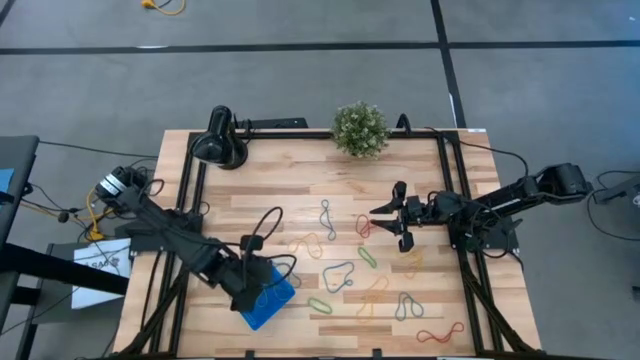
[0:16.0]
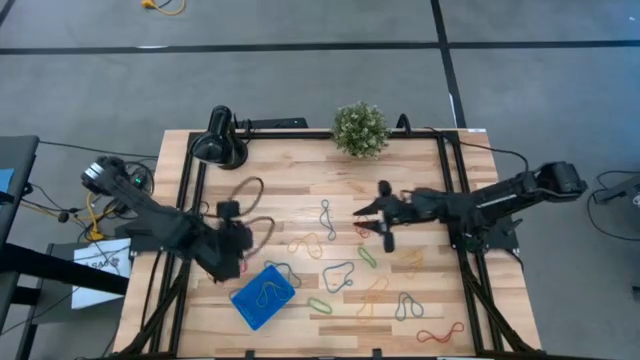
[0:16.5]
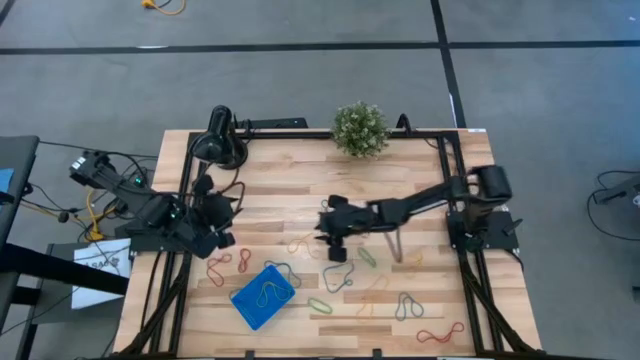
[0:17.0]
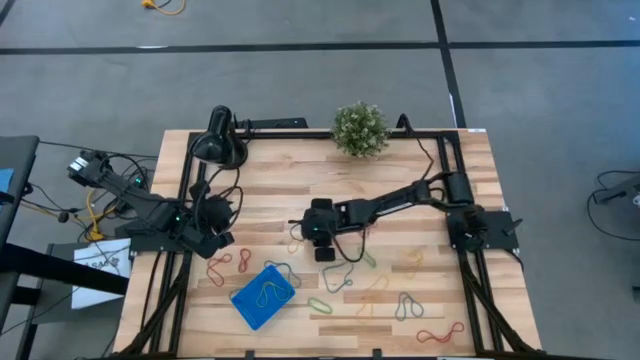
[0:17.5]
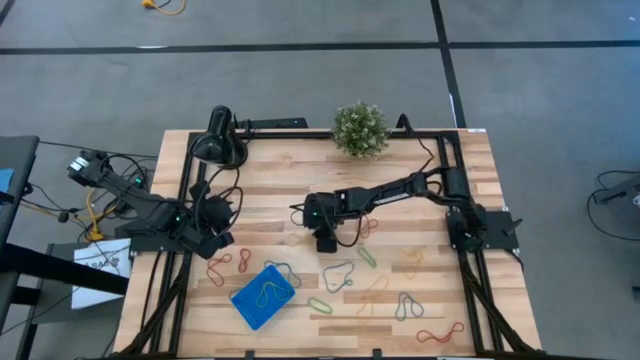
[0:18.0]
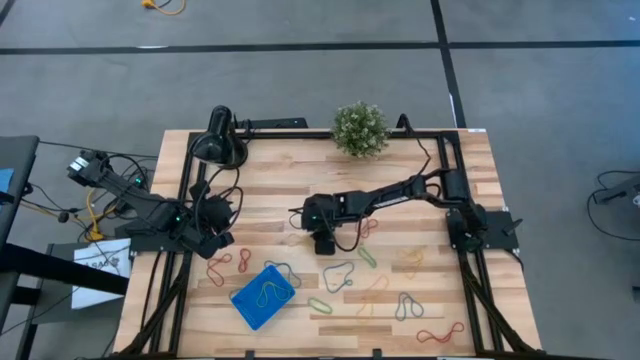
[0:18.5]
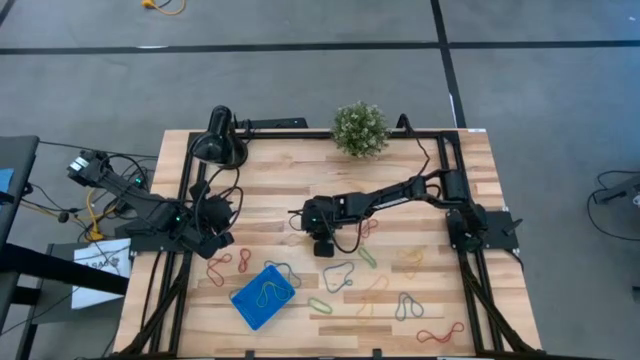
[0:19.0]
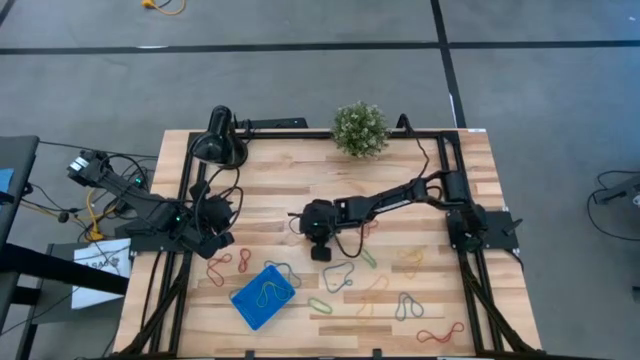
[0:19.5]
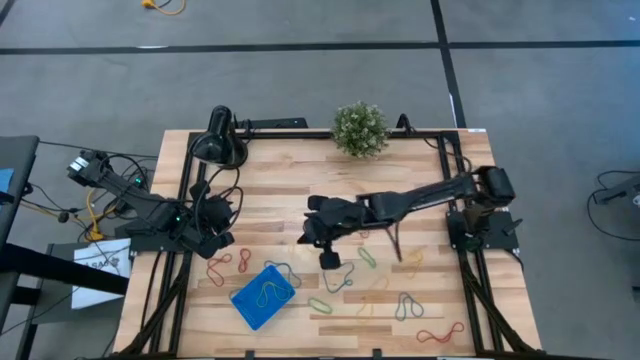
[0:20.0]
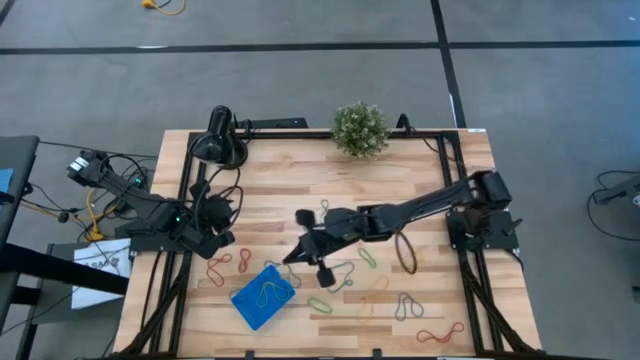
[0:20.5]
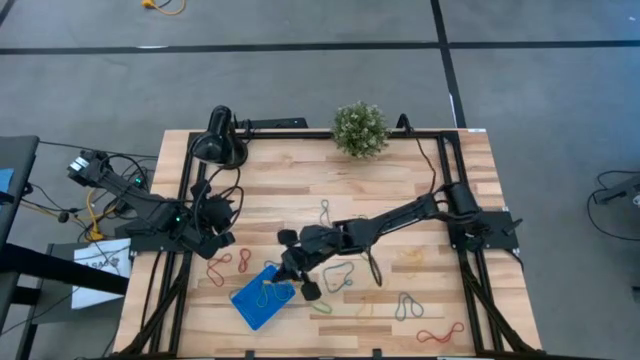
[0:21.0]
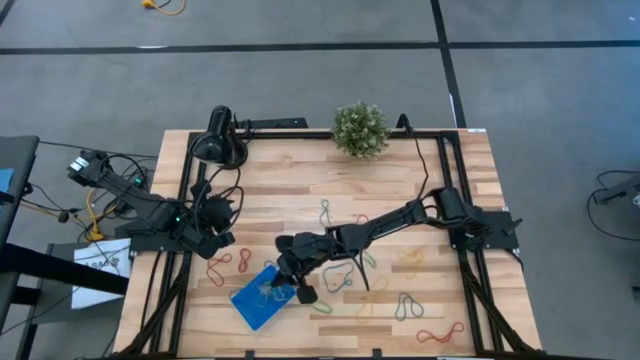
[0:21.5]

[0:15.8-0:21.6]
Task: Pick and place rubber bands into bin
Put the yellow rubber band into the blue basket

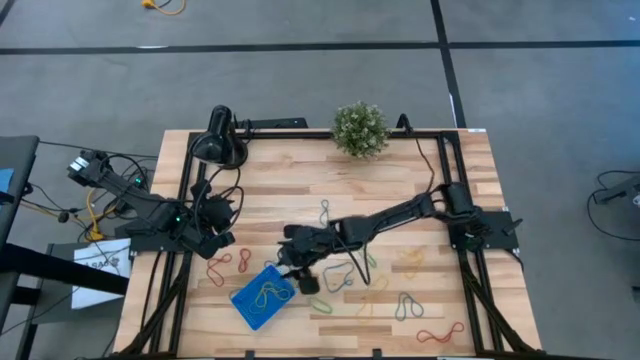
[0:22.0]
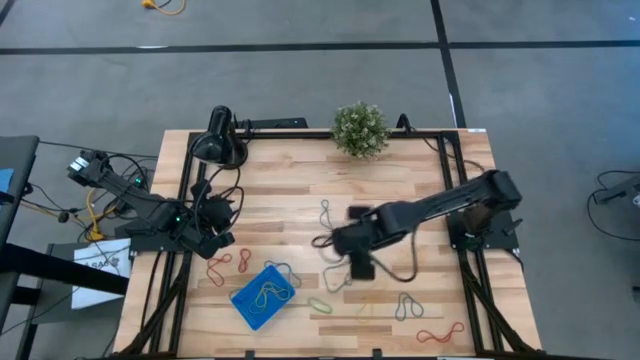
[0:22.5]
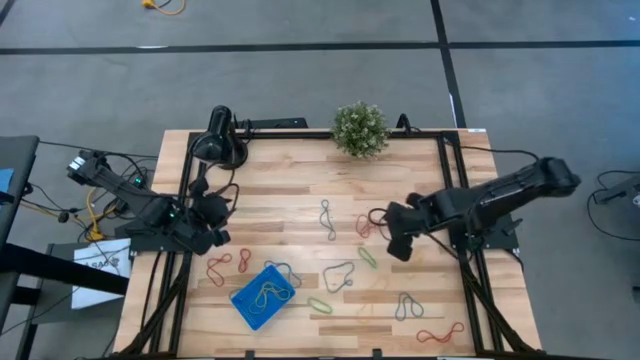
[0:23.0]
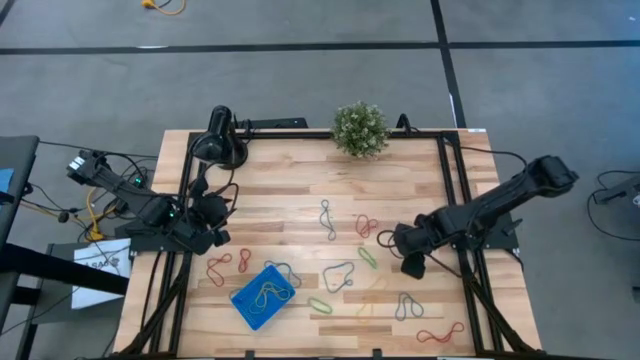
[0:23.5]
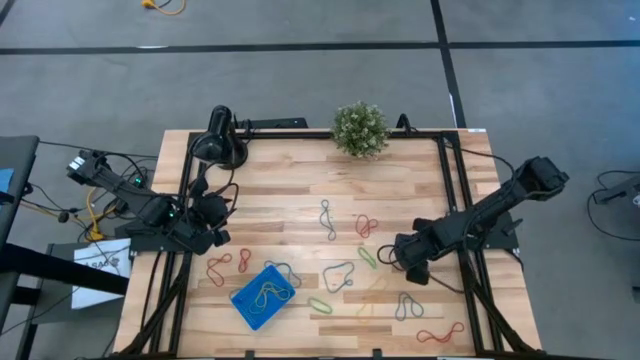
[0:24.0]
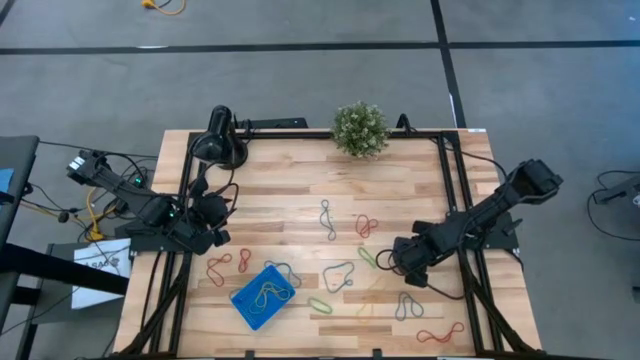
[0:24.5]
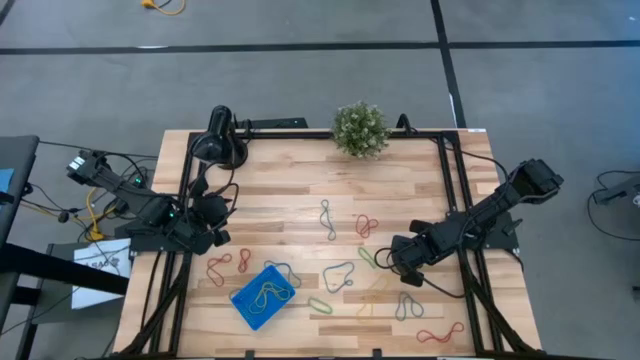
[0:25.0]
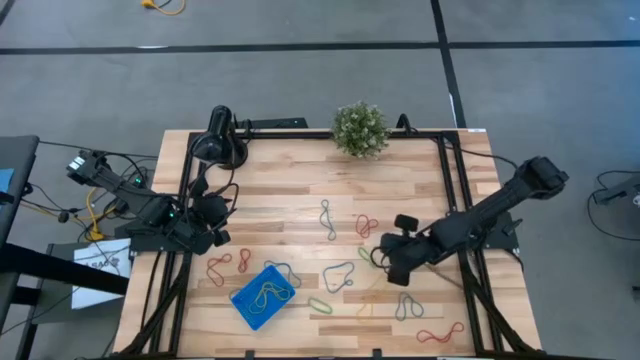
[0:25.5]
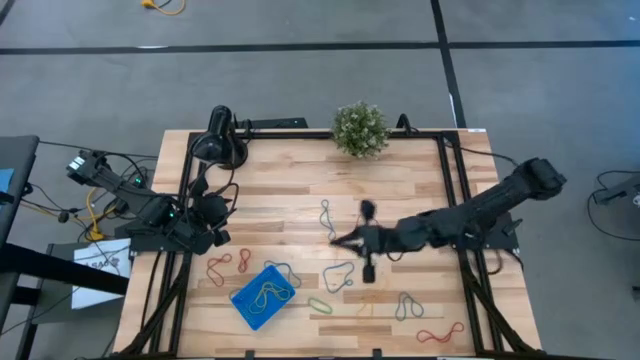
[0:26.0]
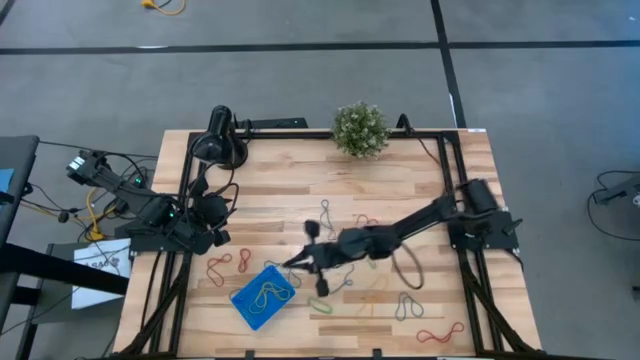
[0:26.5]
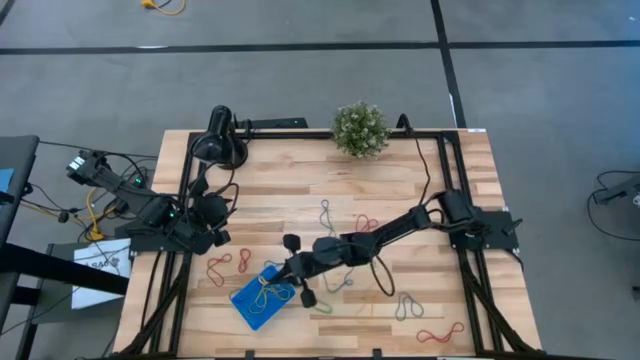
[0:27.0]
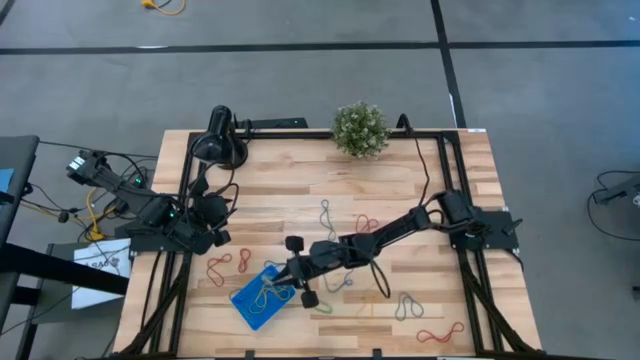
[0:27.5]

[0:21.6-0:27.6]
Put the yellow rubber band into the blue basket

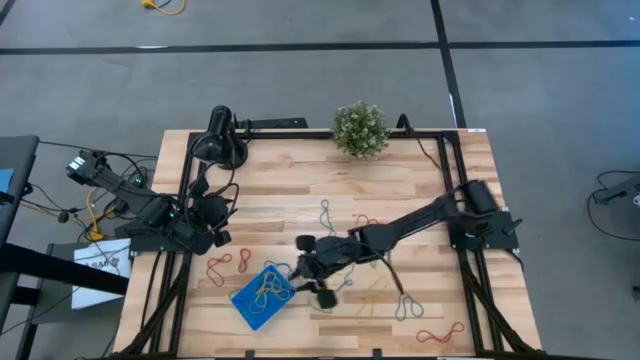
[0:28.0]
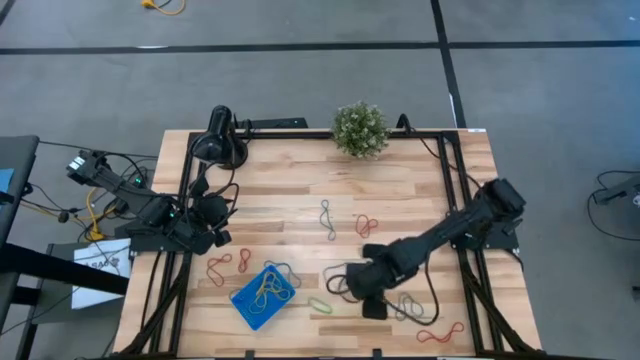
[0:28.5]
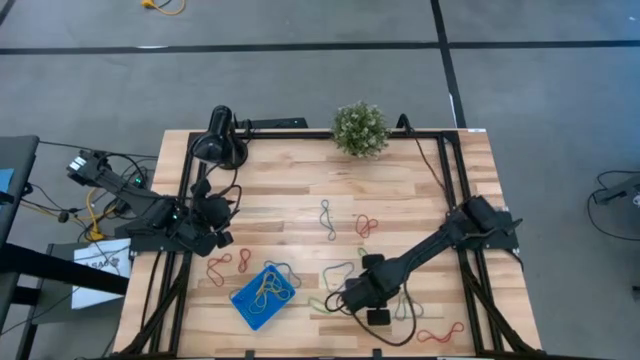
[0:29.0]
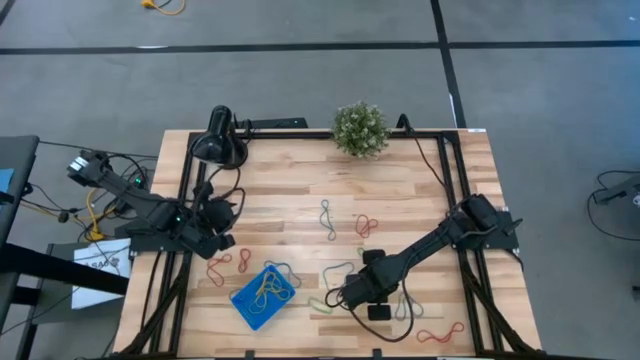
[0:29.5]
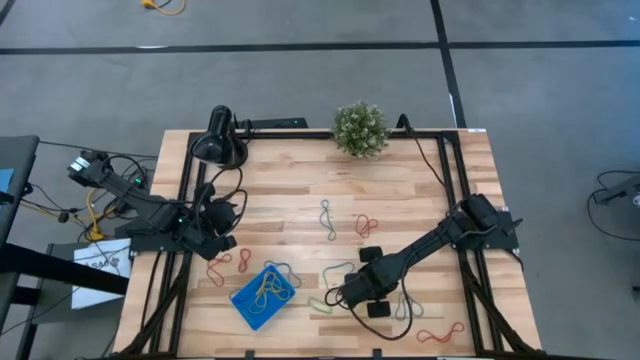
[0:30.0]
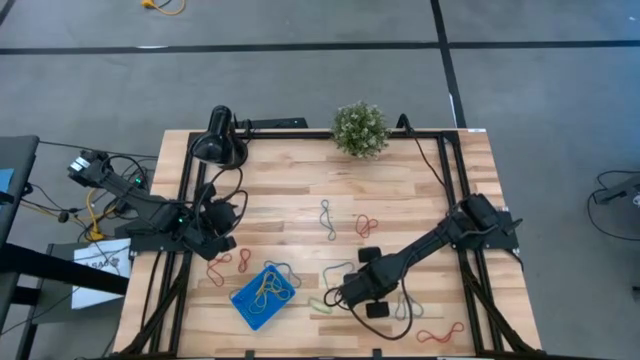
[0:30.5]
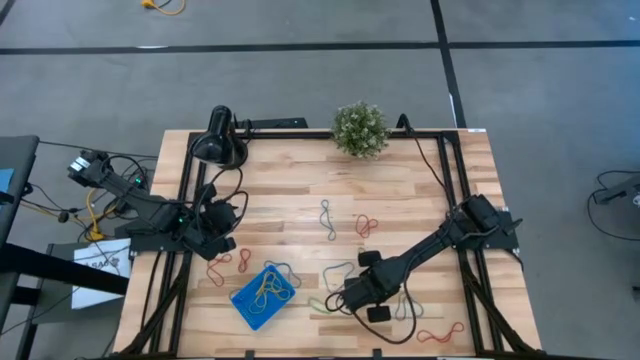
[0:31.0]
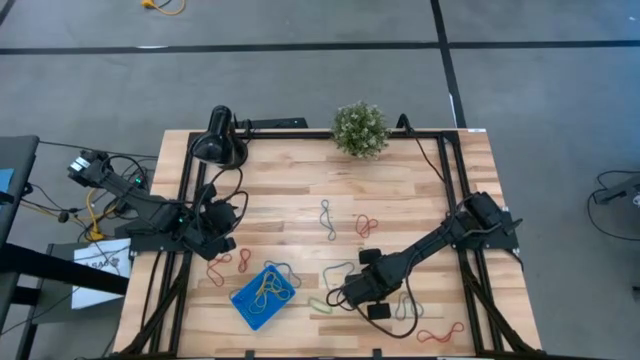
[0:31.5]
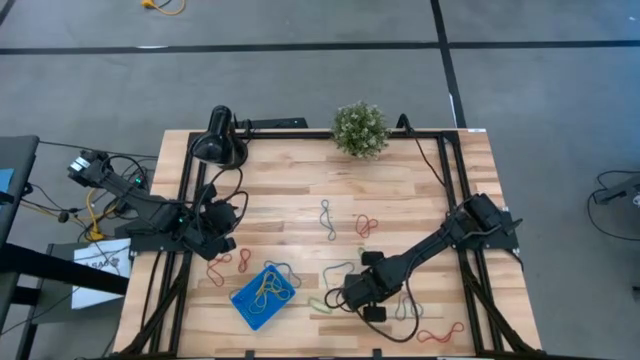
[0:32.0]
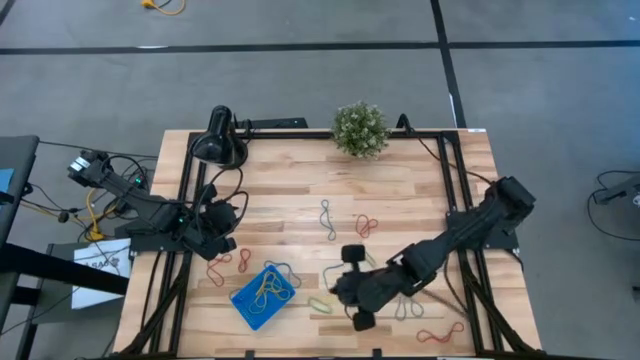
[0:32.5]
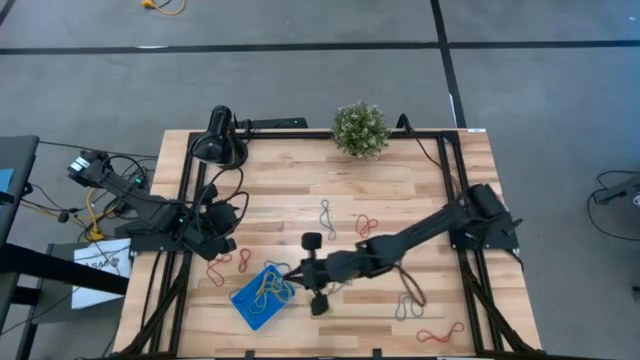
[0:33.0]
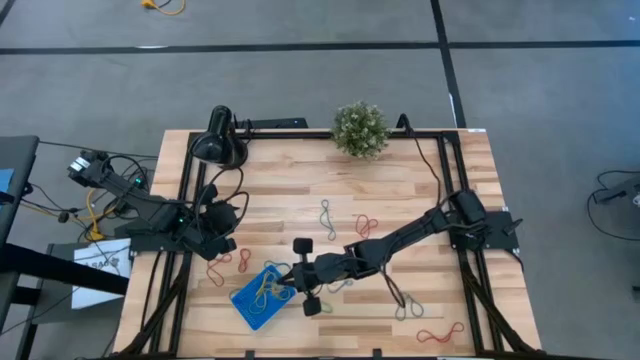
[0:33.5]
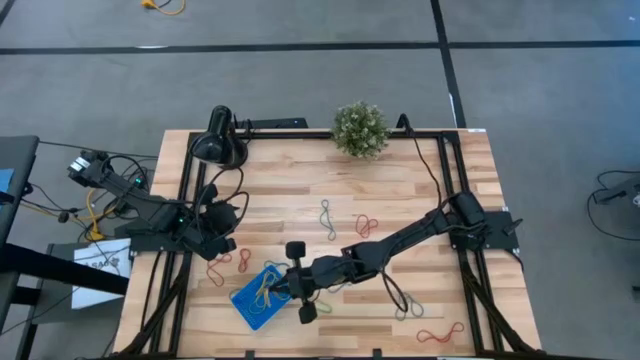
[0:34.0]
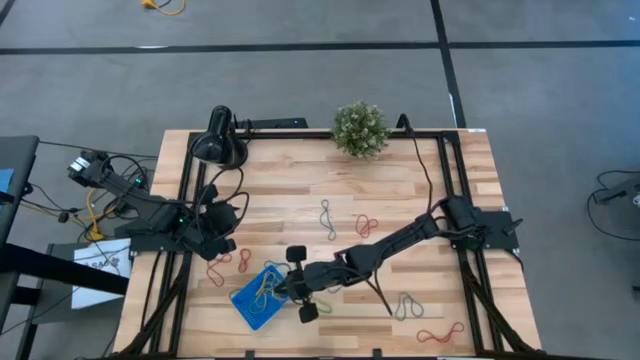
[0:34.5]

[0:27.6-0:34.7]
Put the yellow rubber band into the blue basket

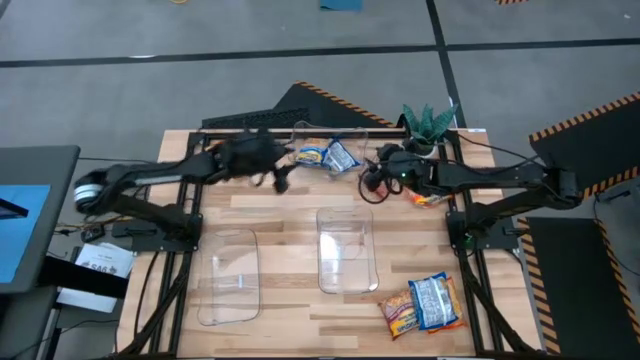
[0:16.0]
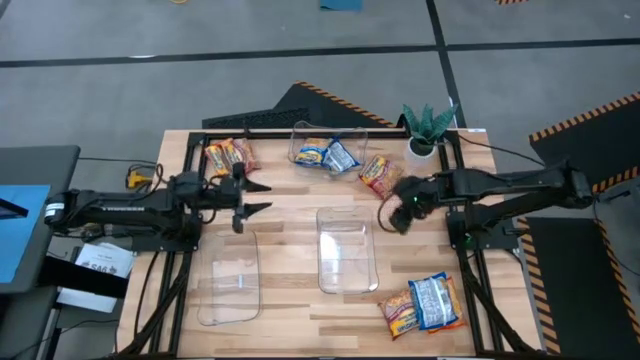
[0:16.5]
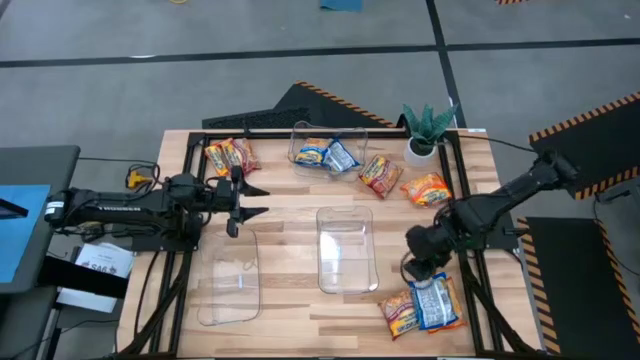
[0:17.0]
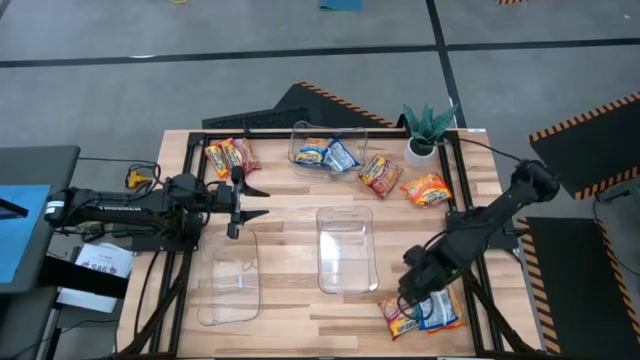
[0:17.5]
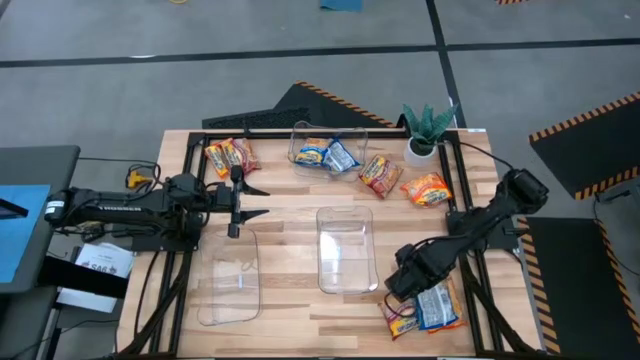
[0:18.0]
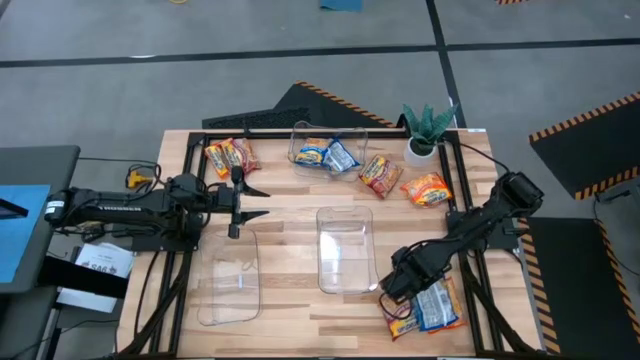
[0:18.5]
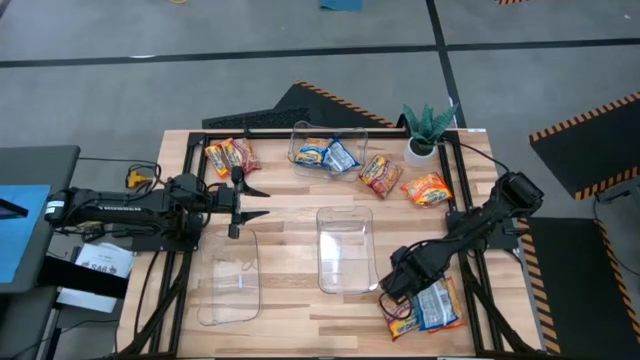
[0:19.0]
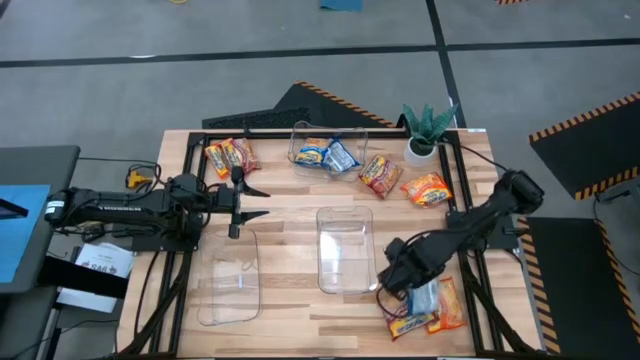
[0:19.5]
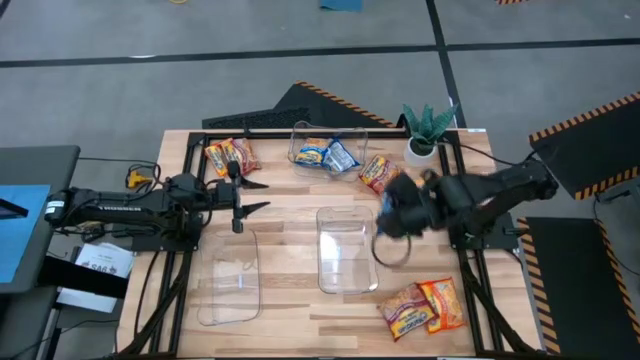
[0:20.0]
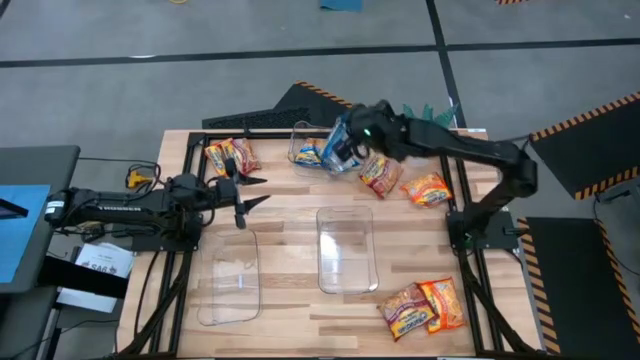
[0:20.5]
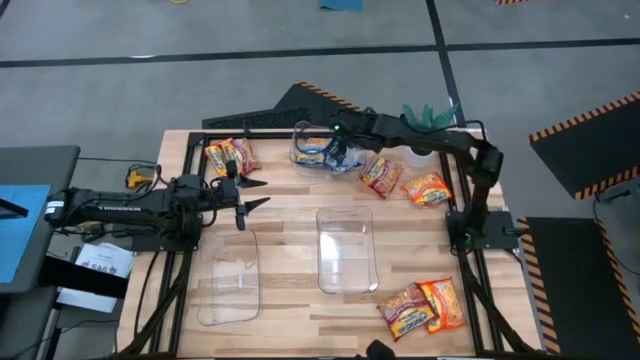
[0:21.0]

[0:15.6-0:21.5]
Task: Sort Maruchan noodles
Put the blue noodle pack into the top transparent bin
